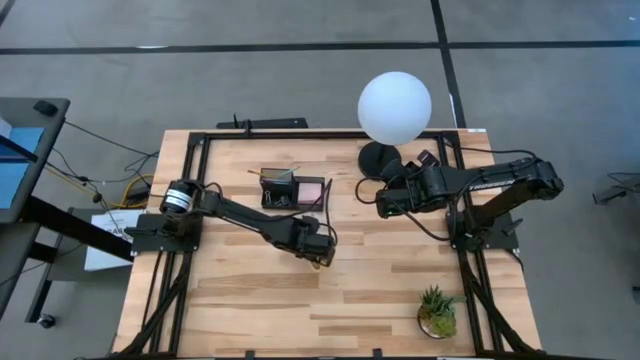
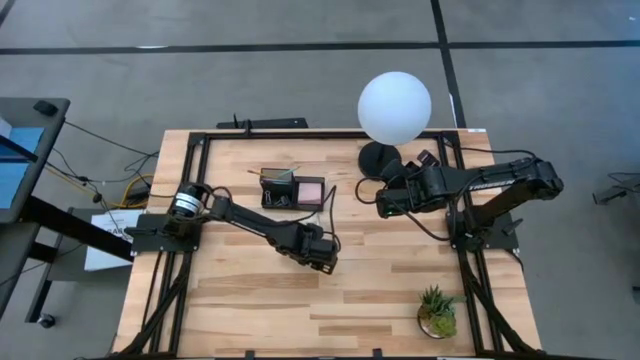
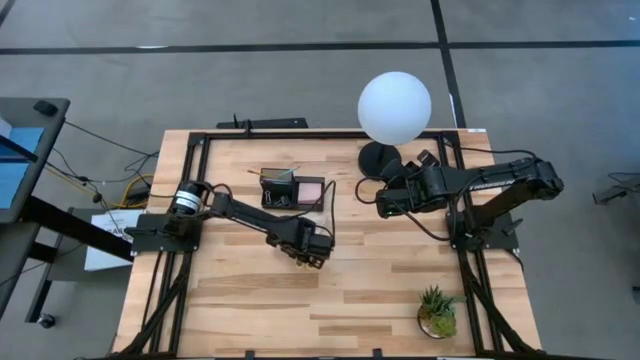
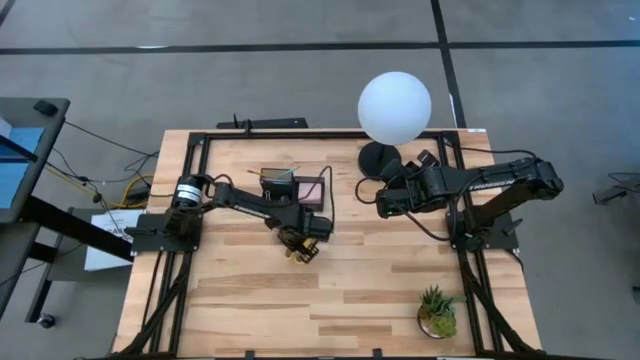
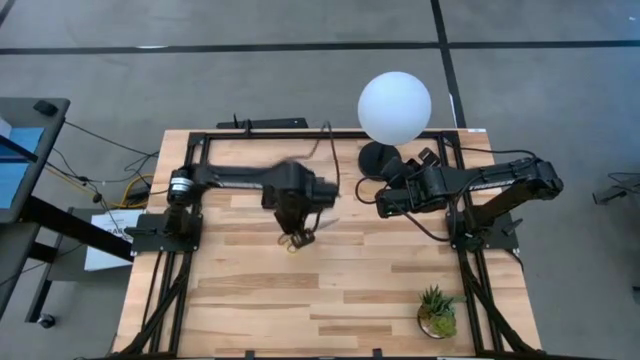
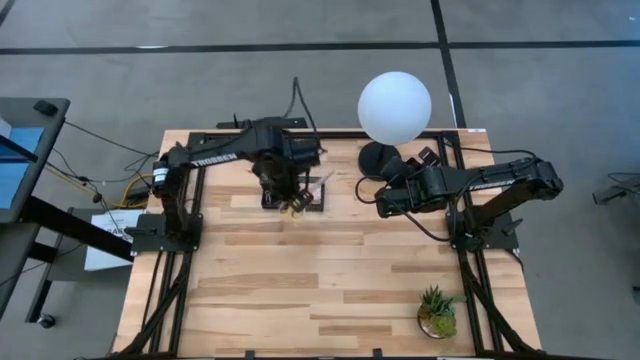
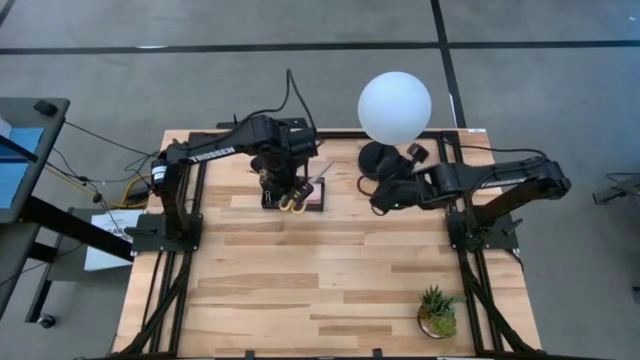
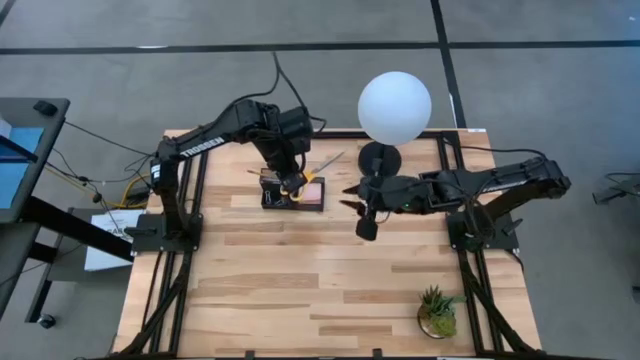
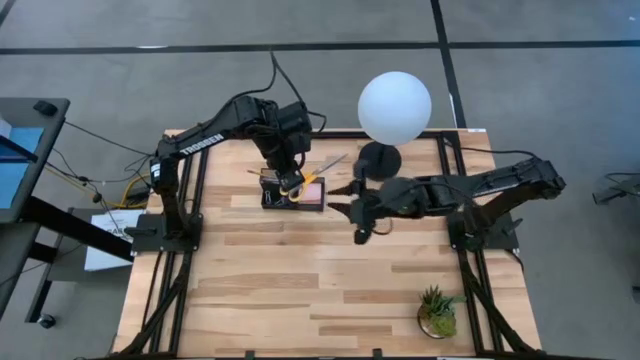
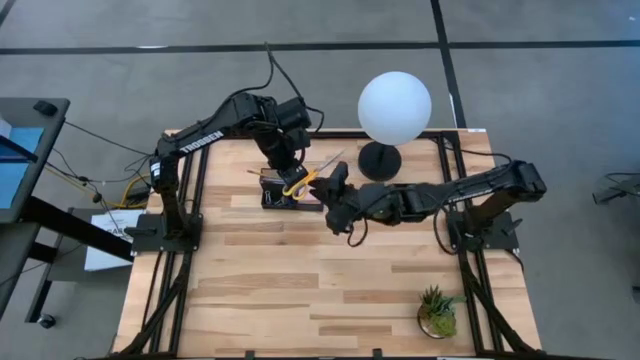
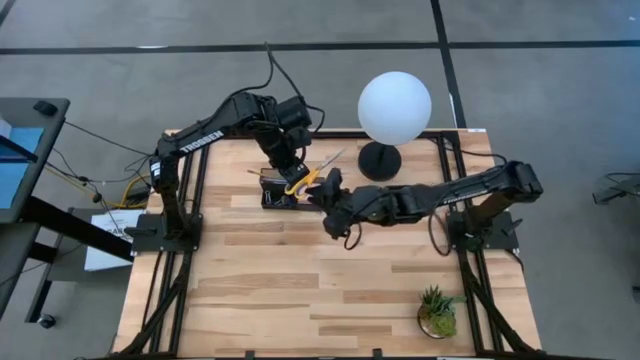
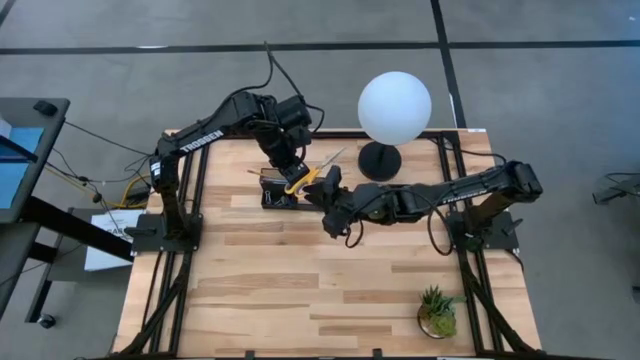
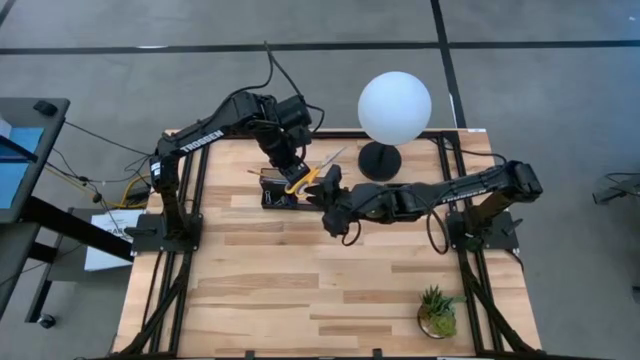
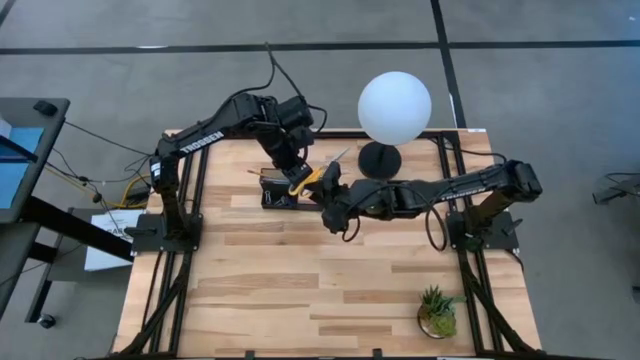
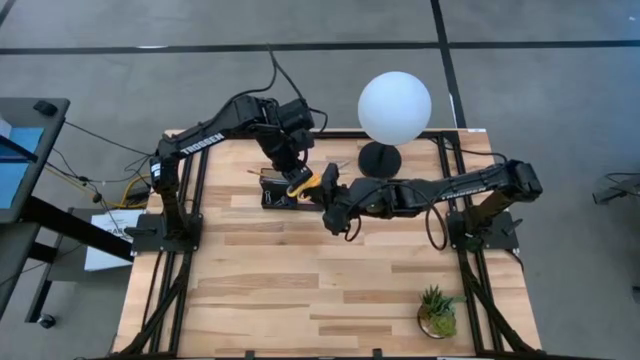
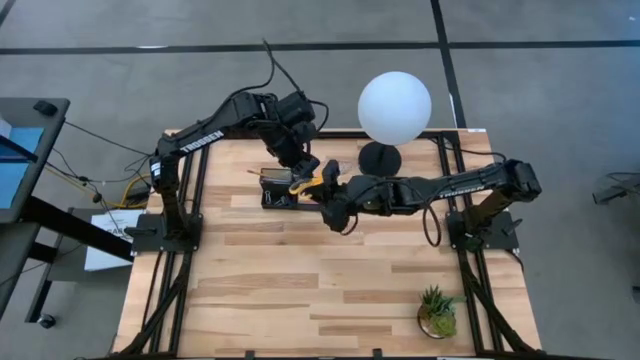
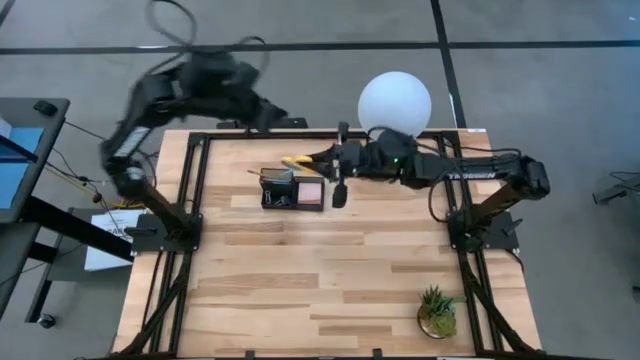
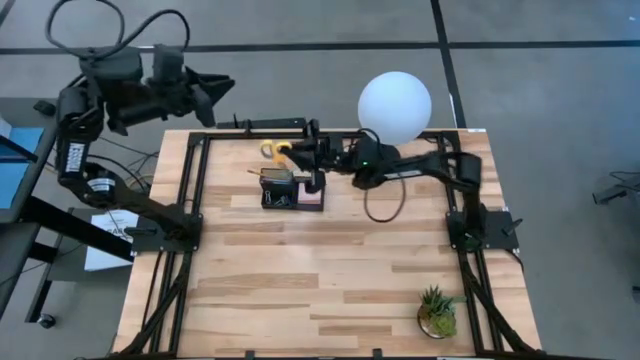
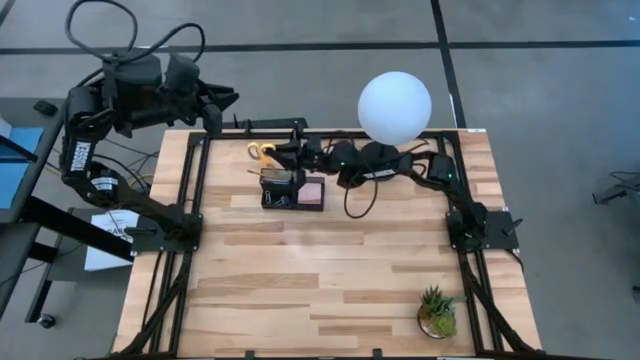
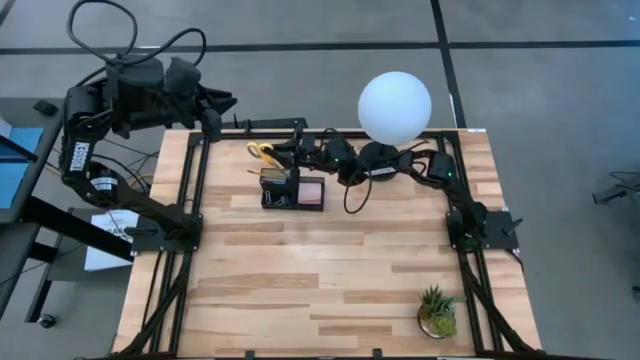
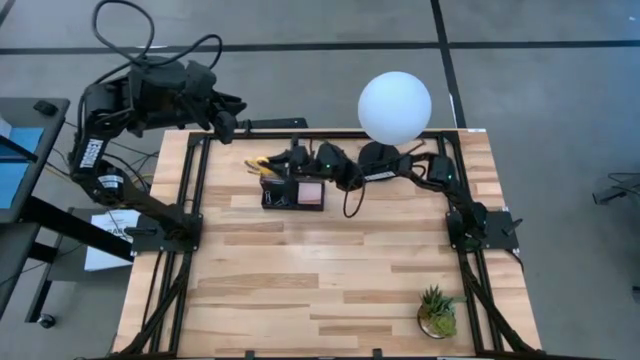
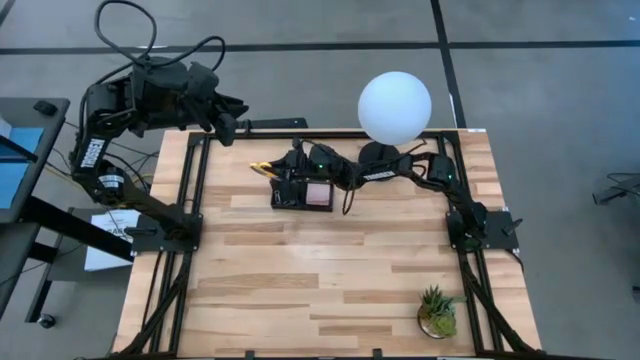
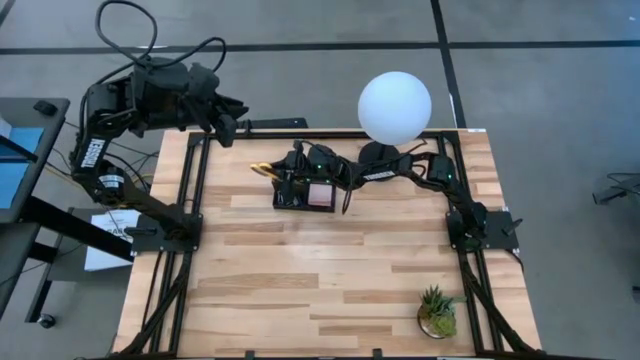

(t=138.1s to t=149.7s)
Task: Pick and place office supplies into organizer
Put the yellow scissors into the black desk organizer

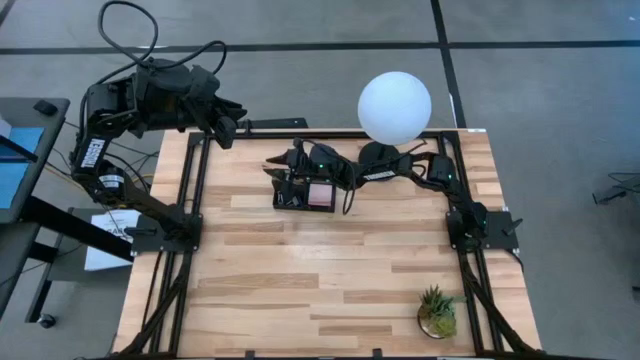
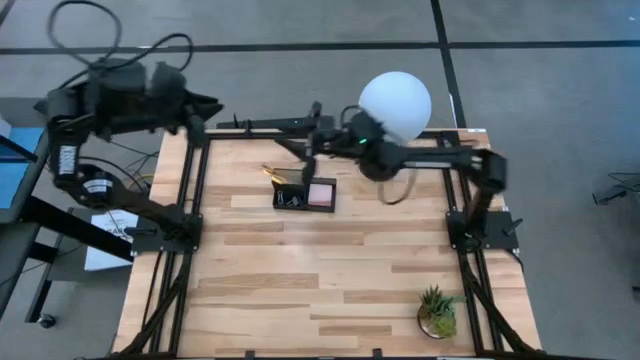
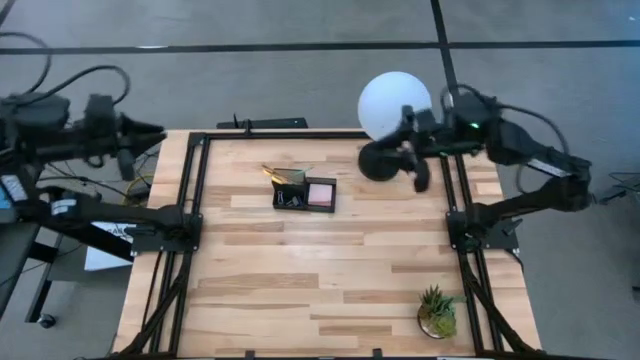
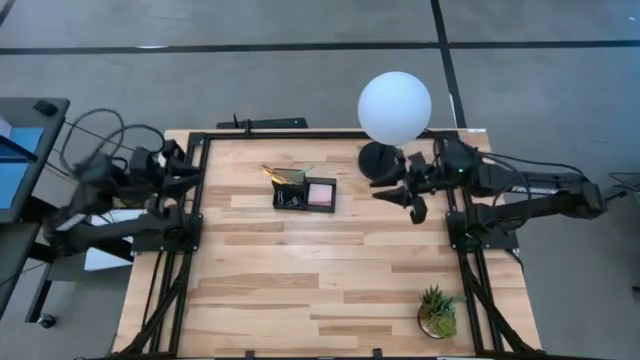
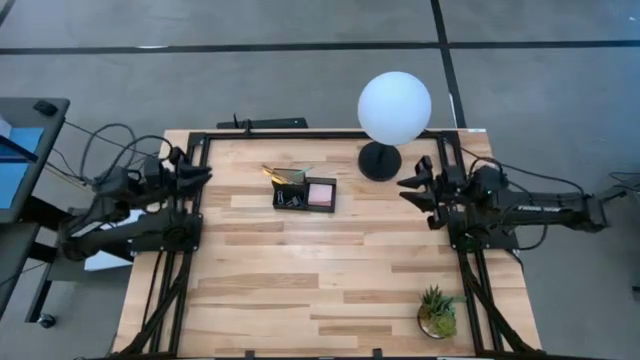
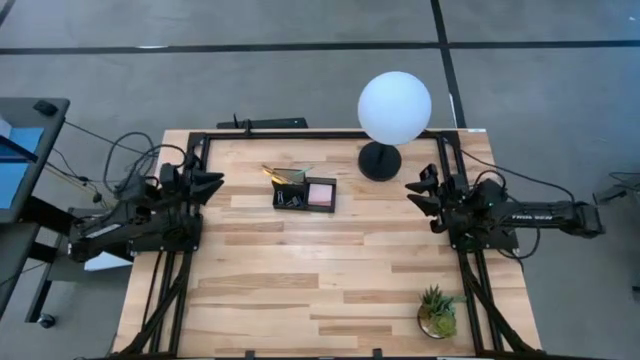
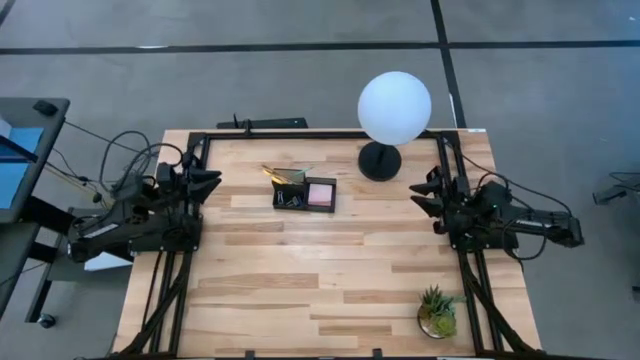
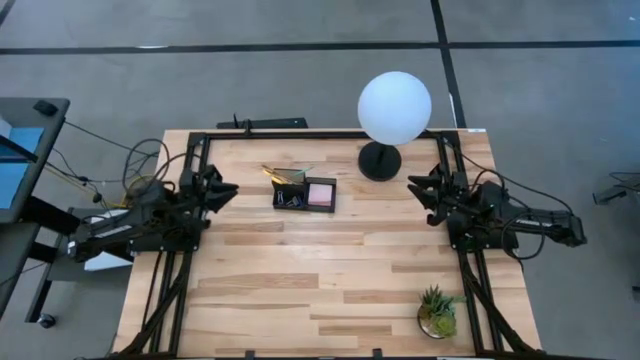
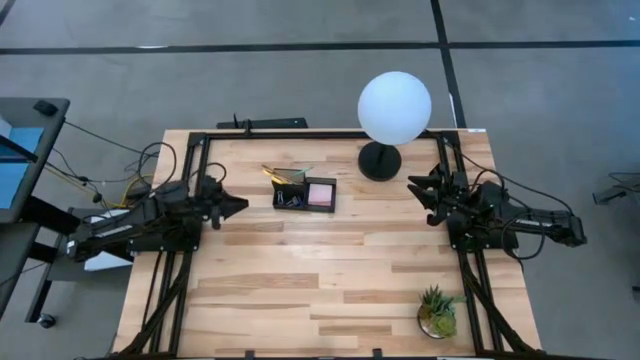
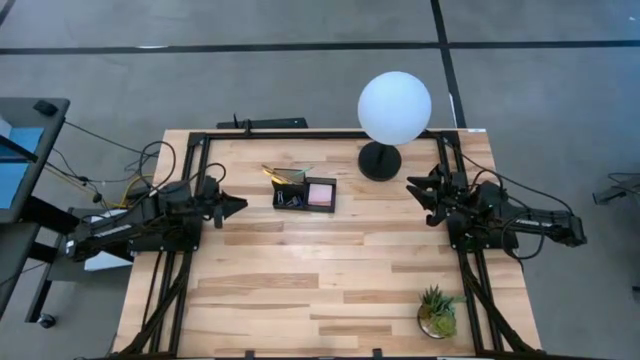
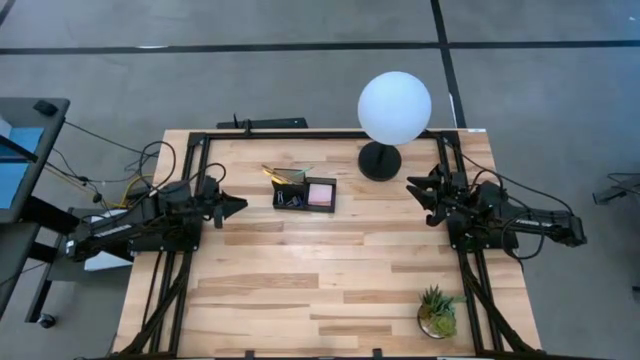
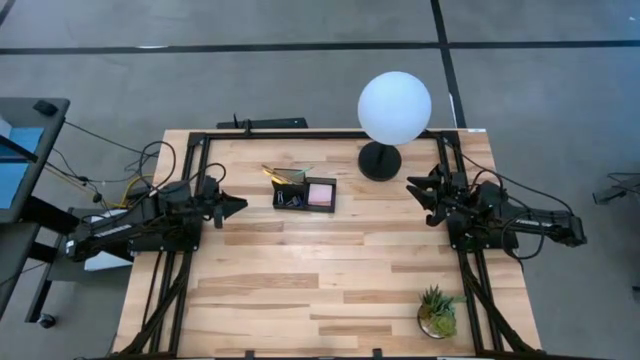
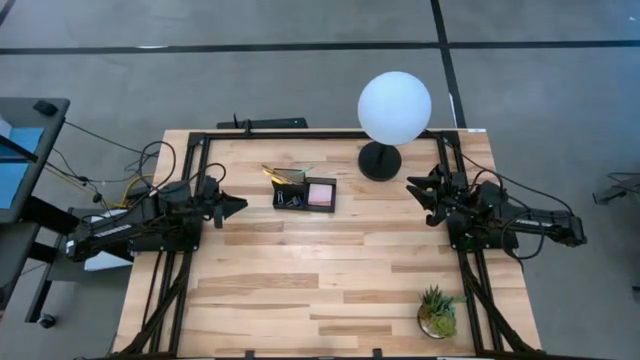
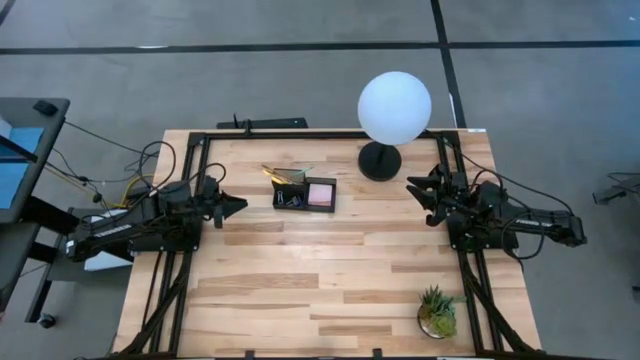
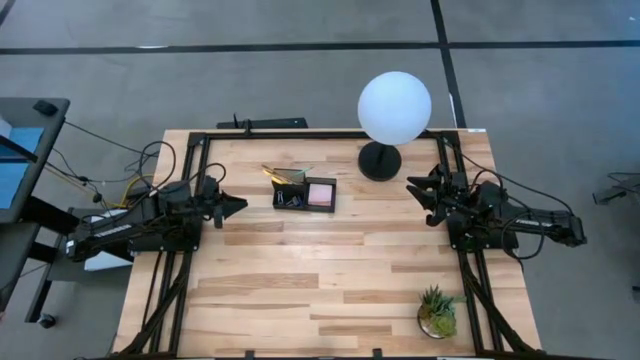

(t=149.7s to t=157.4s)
Return to Home Position
